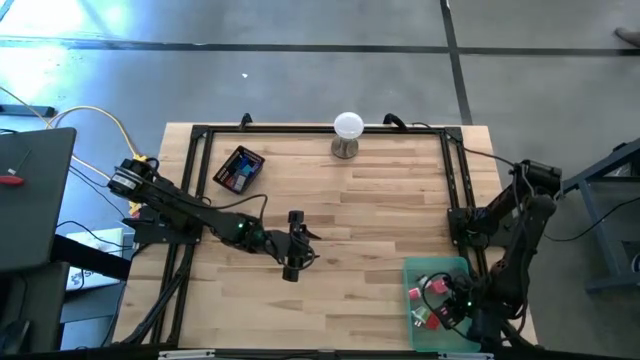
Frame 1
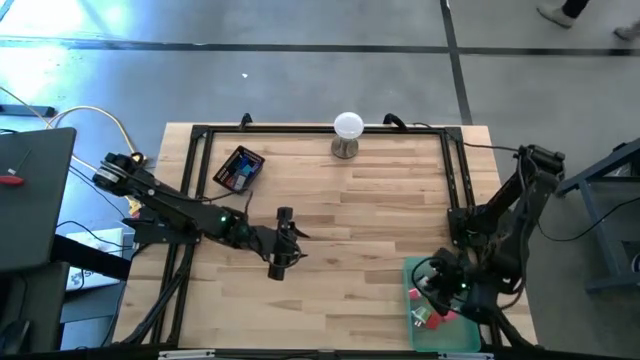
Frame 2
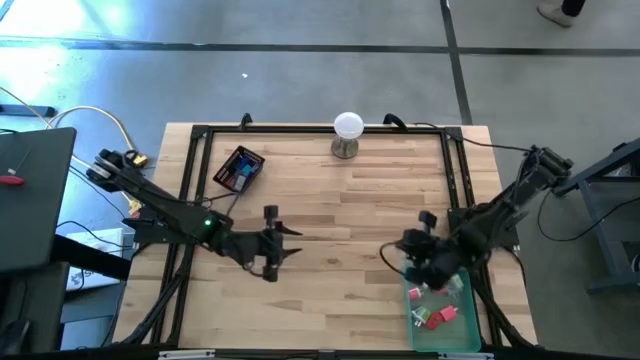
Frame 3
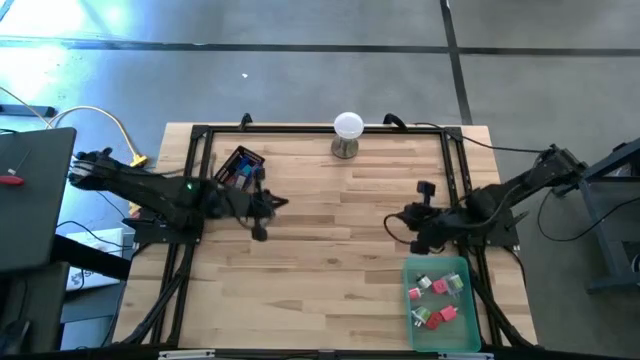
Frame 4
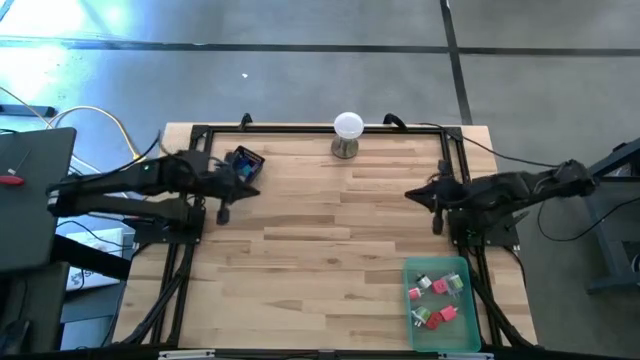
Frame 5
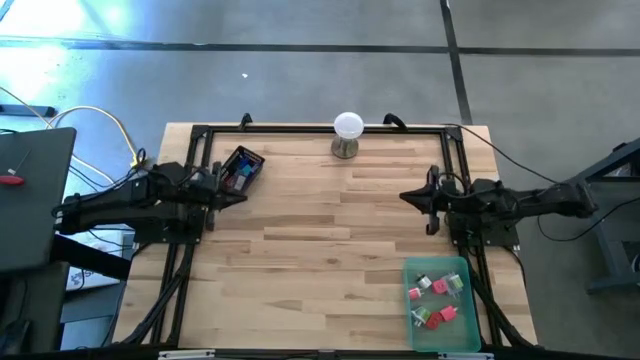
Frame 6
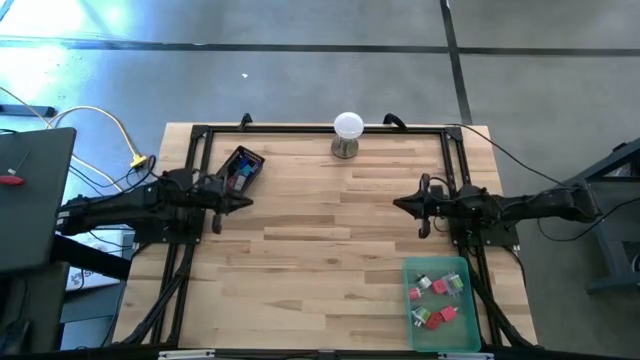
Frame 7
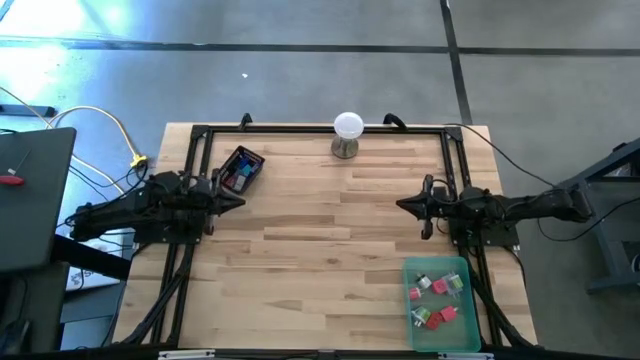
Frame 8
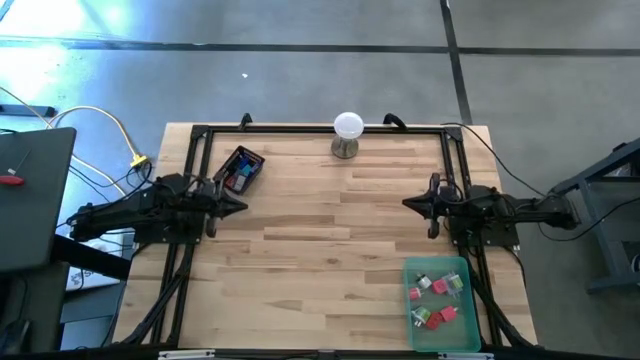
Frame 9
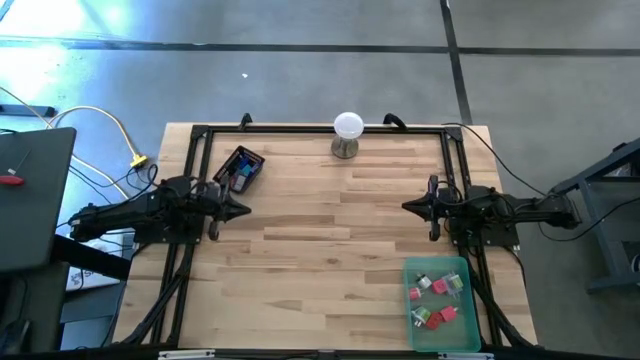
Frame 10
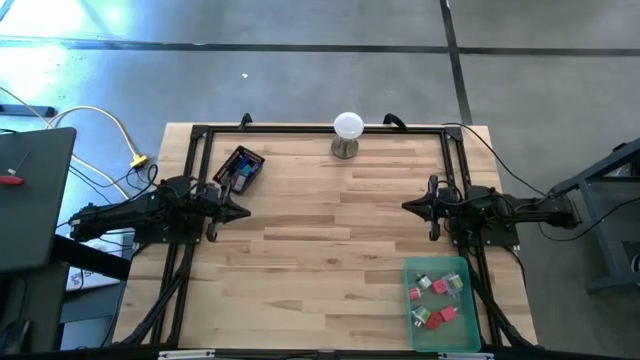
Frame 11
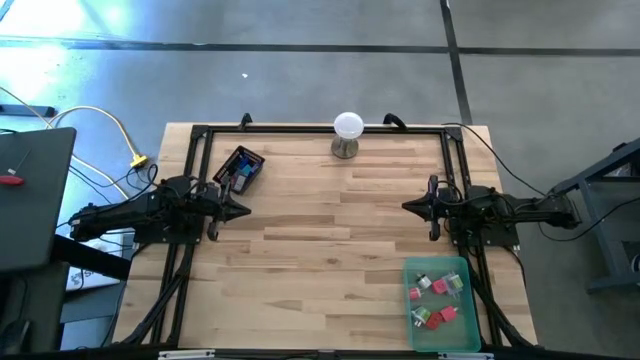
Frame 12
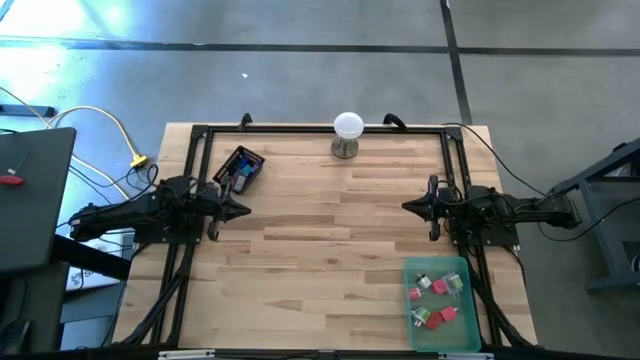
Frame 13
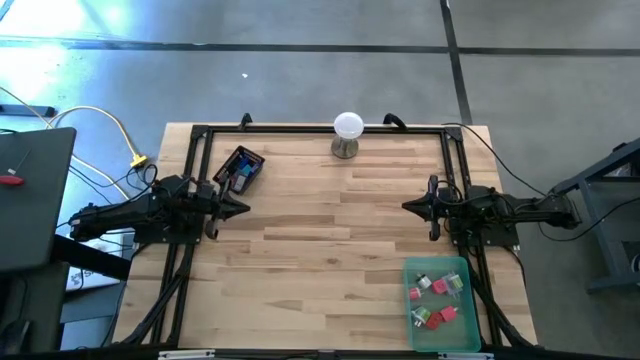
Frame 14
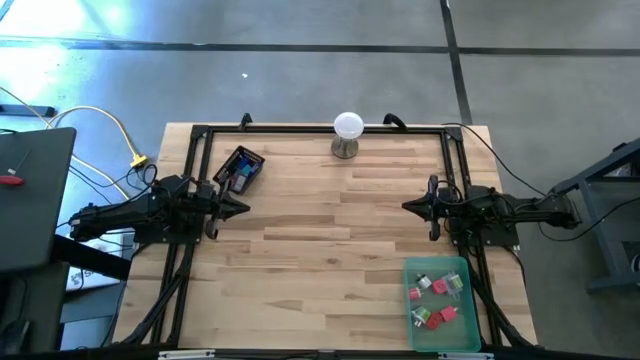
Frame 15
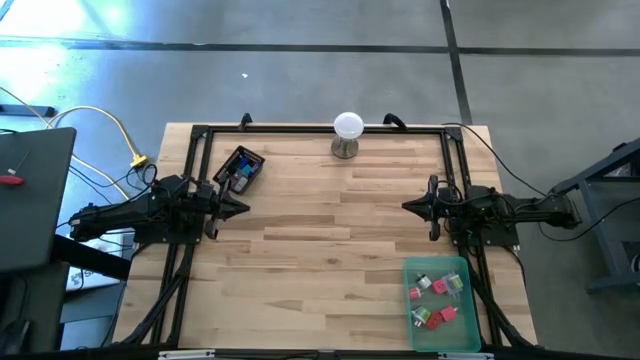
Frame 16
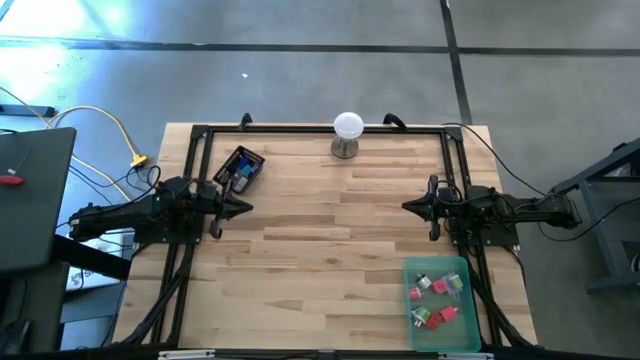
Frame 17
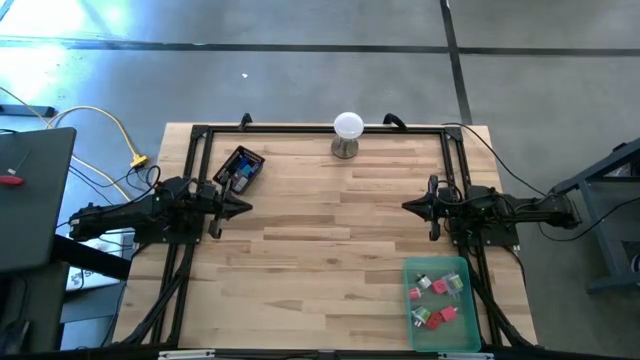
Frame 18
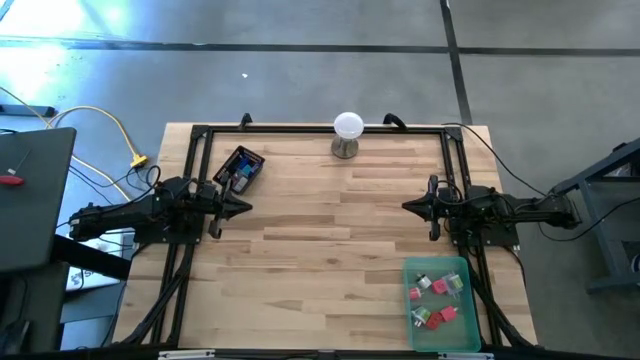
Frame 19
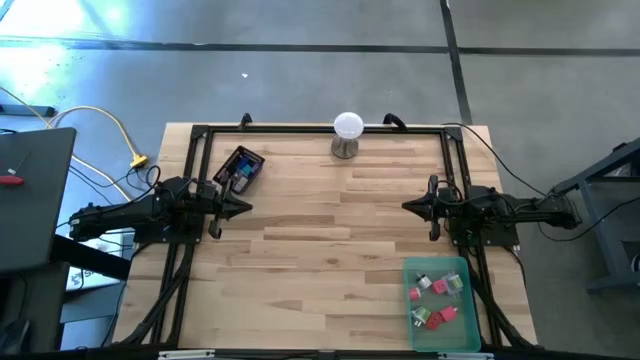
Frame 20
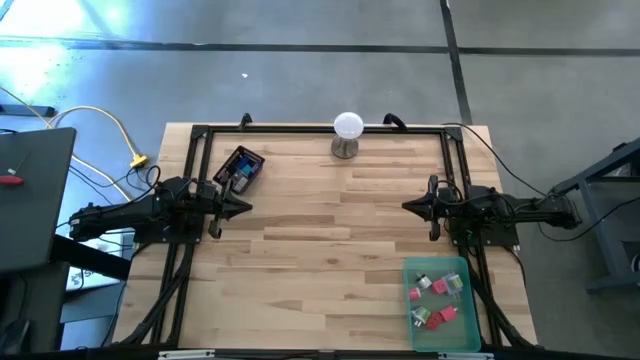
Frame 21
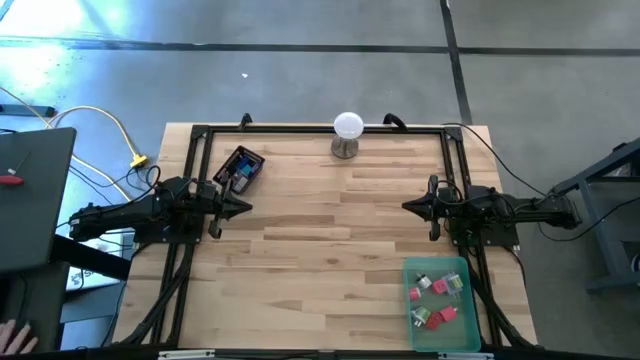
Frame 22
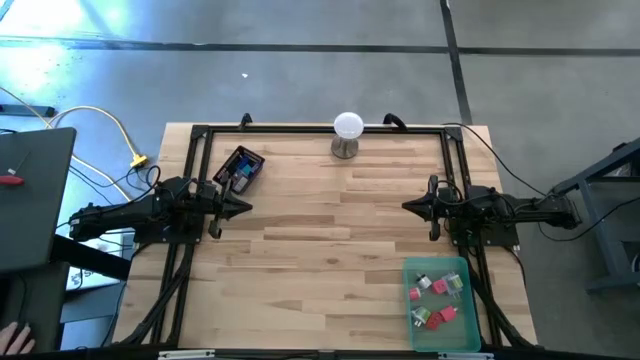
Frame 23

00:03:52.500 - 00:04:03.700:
Task: Pick & Place Office items
Return to Home Position

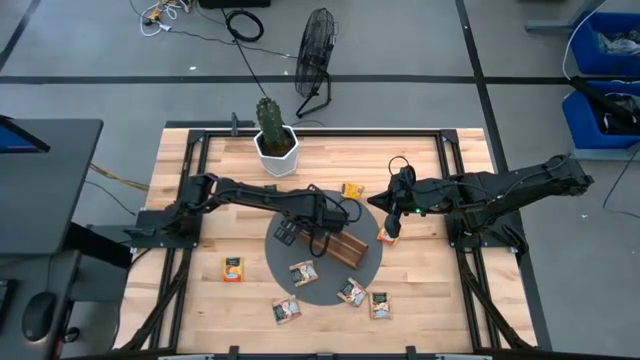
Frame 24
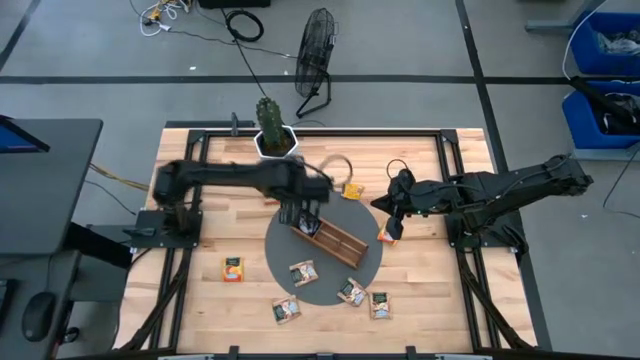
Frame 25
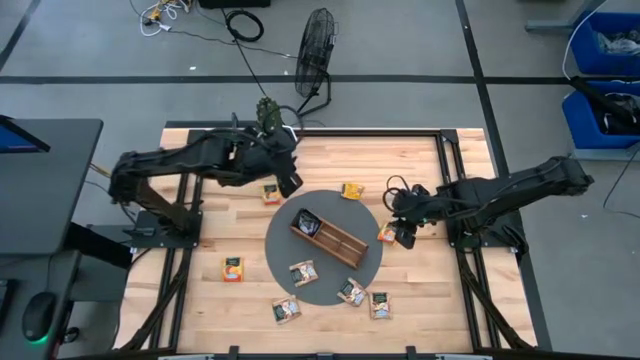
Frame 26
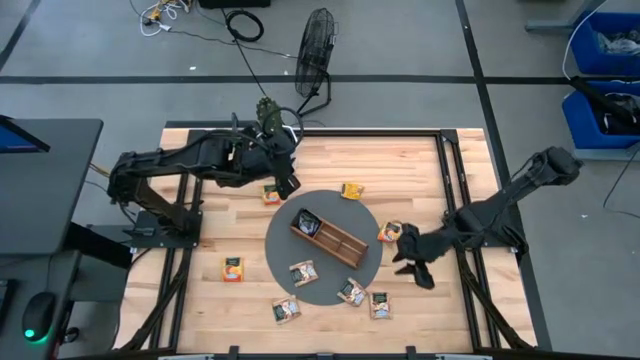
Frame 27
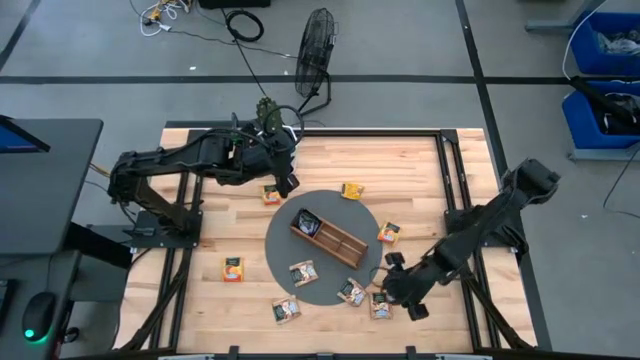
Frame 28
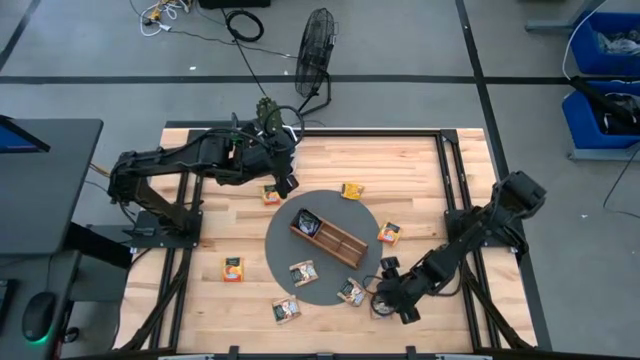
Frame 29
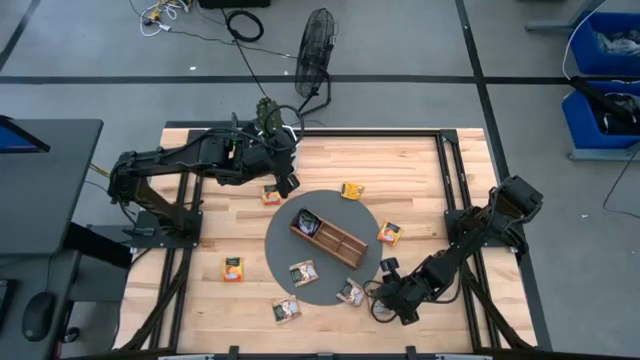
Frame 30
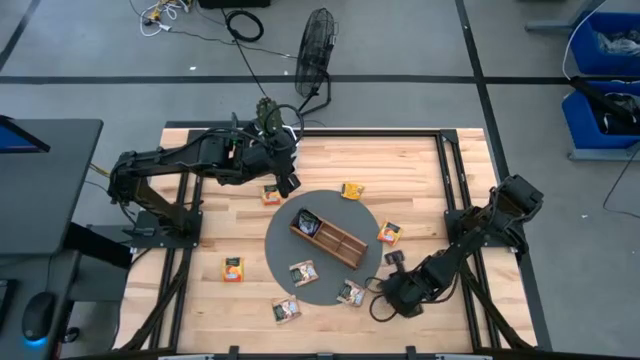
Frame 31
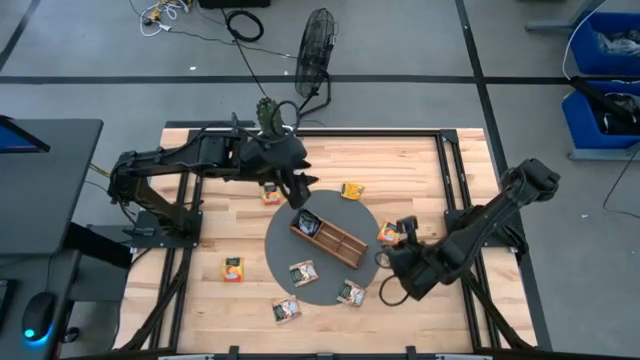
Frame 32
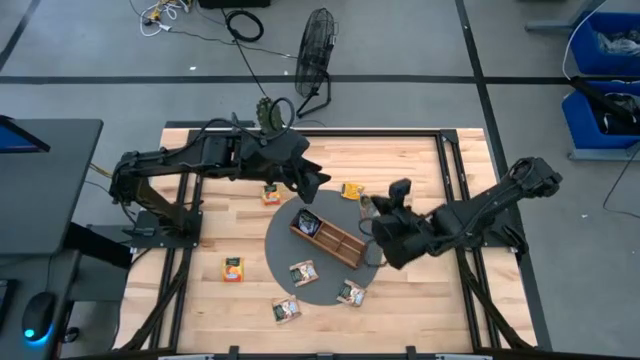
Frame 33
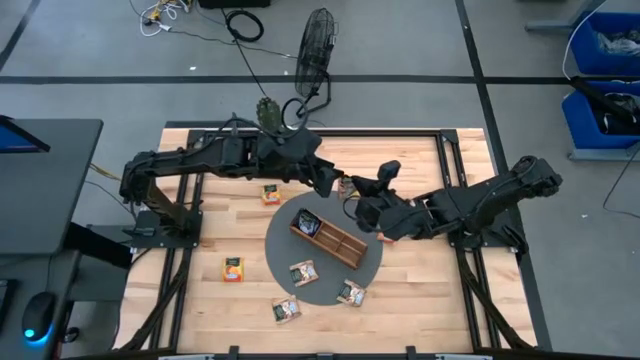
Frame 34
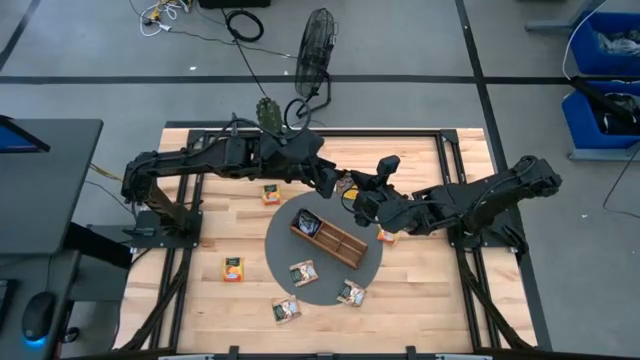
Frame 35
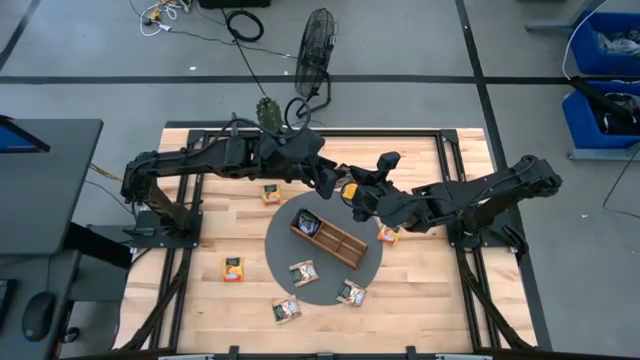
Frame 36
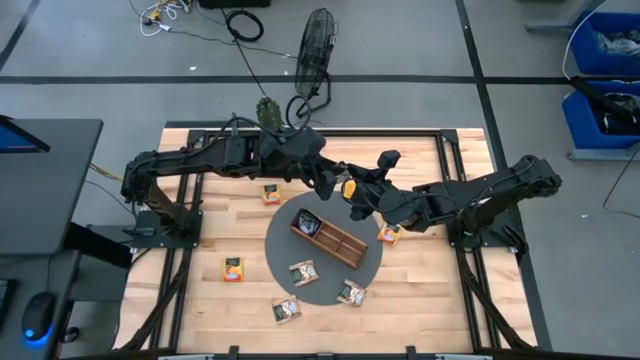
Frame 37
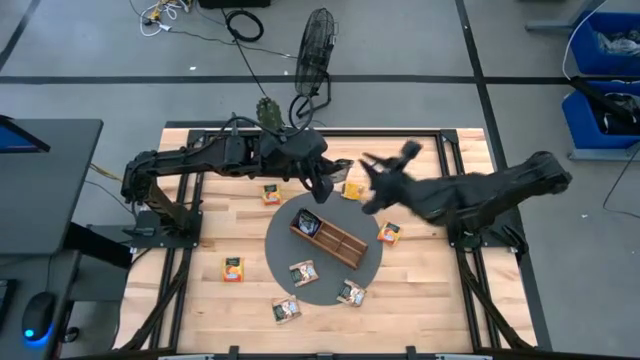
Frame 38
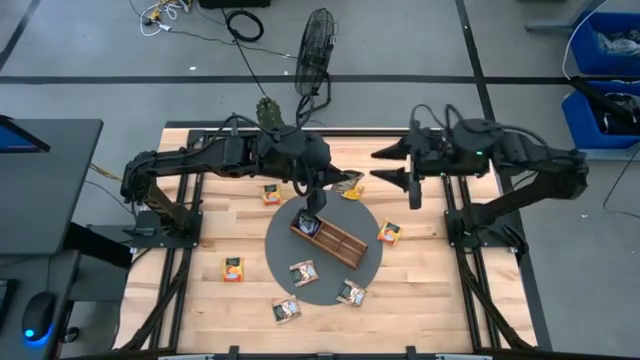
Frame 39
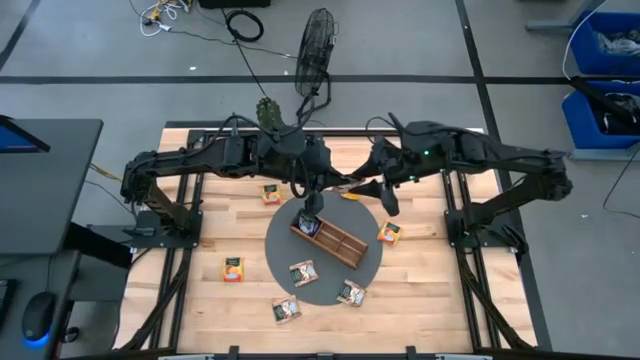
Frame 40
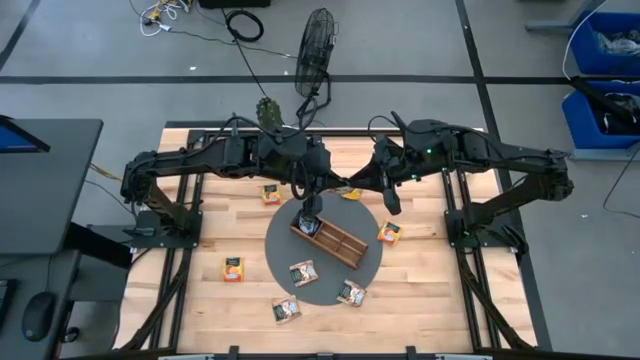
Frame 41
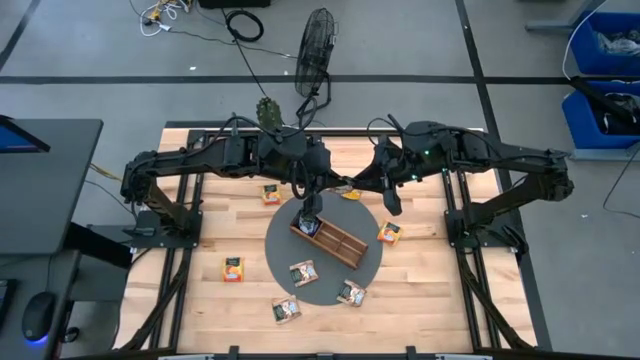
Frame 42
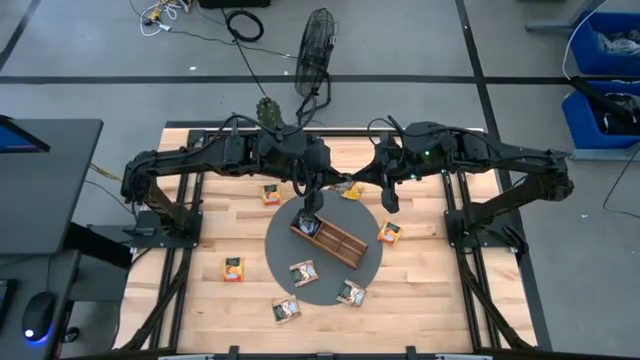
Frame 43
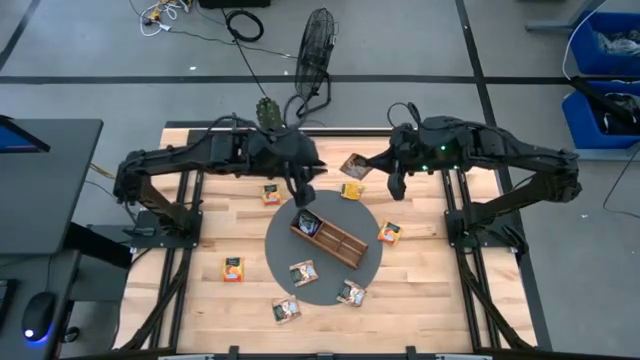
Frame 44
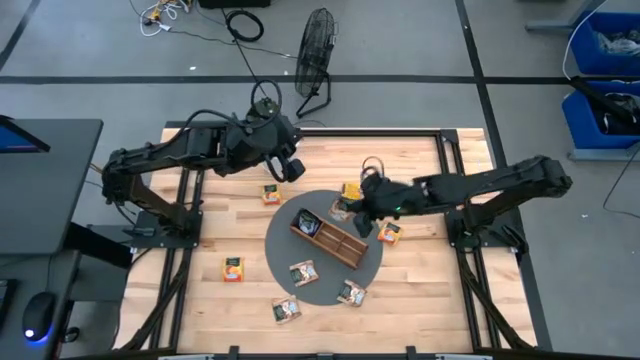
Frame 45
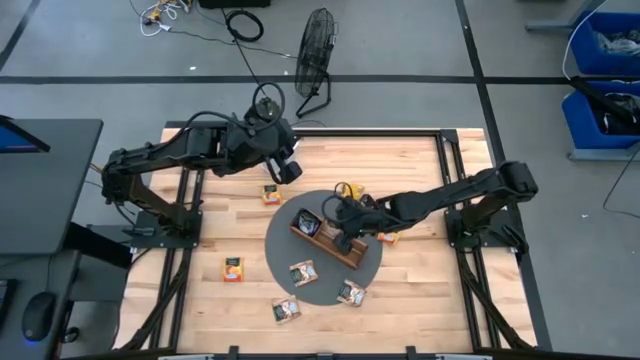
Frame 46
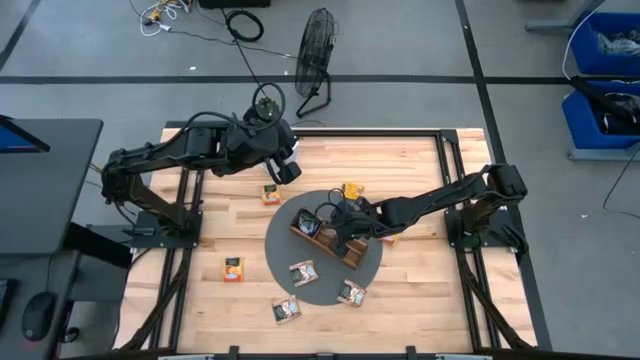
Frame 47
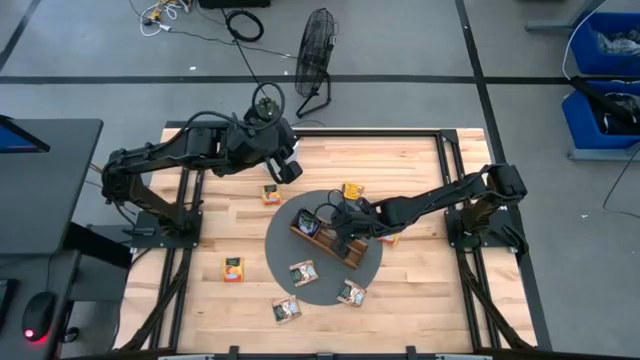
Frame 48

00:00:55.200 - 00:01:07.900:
Task: Pick & Place Tea
Put the brown tea bag into the middle section of the wooden organizer
